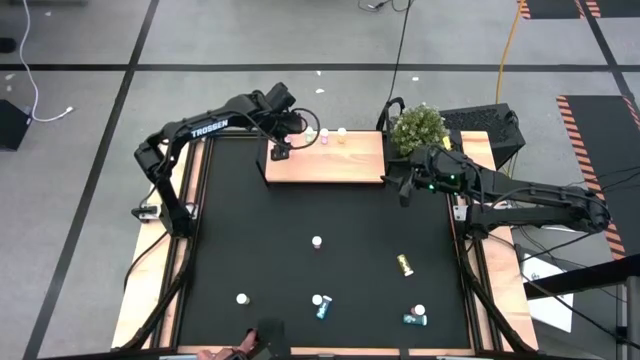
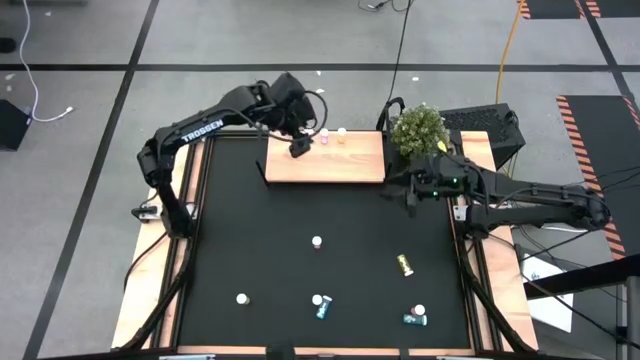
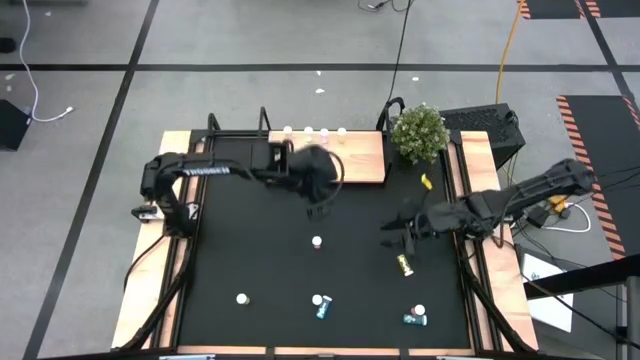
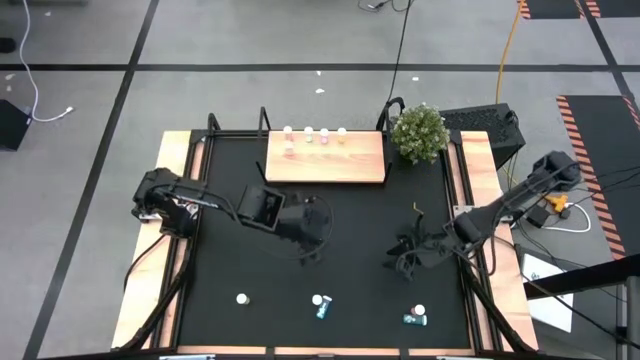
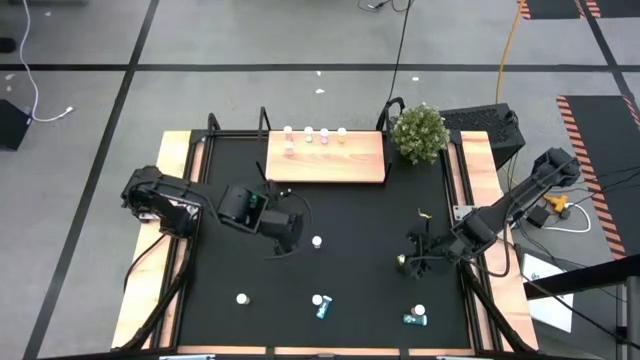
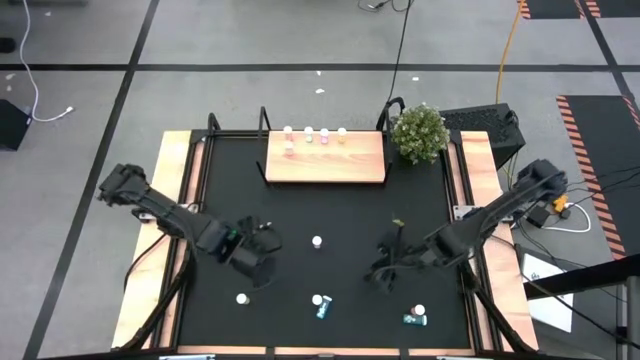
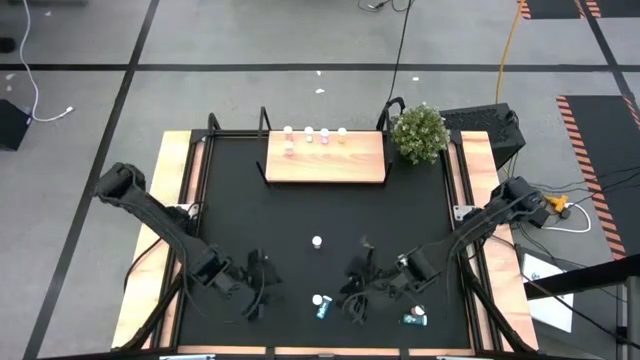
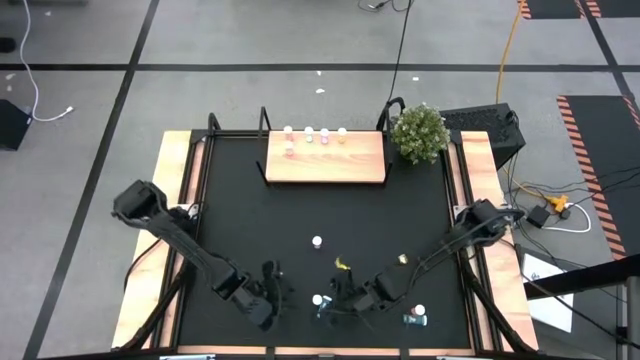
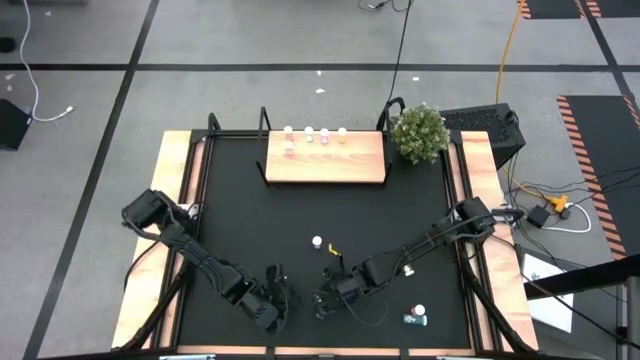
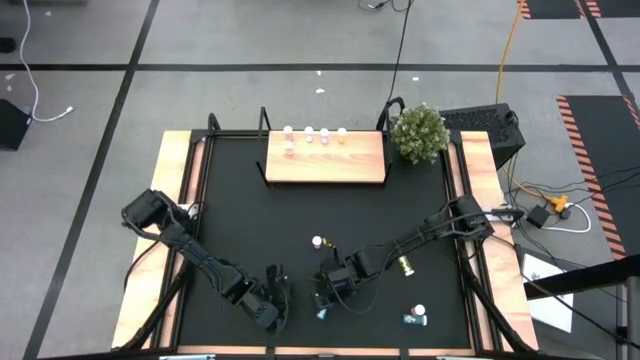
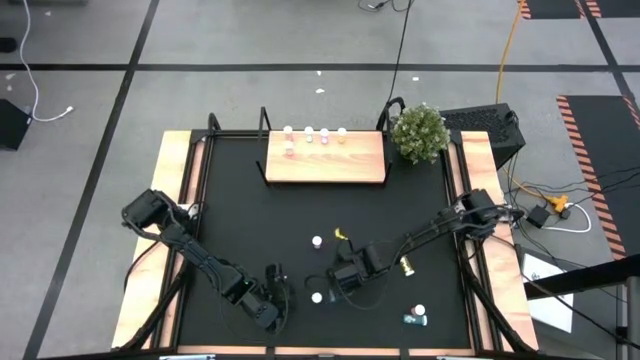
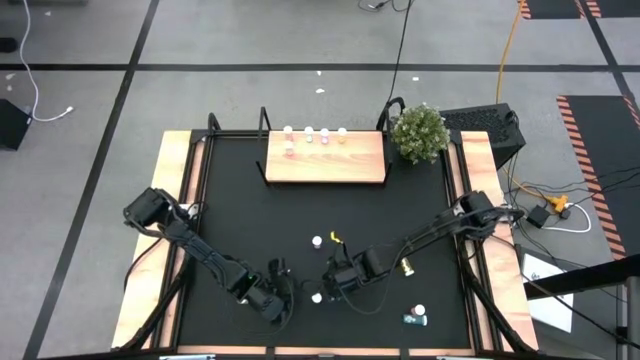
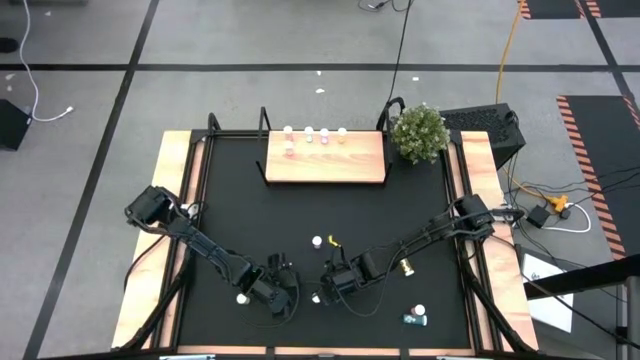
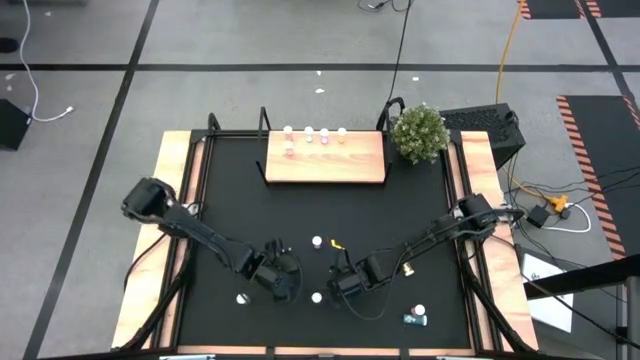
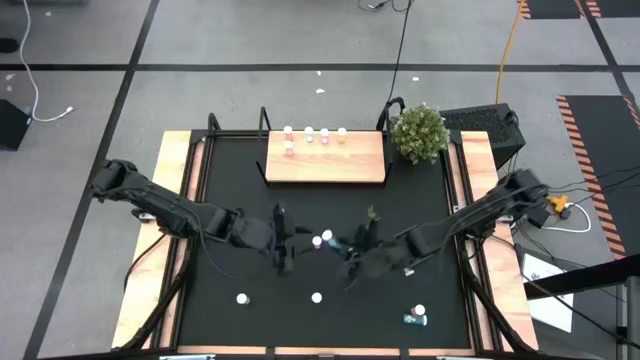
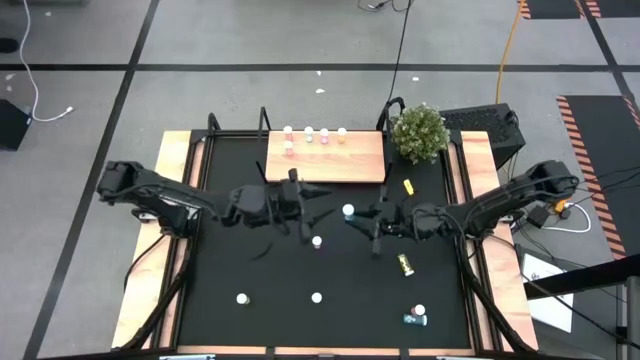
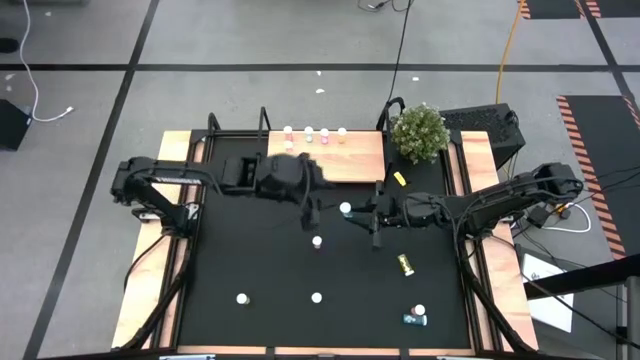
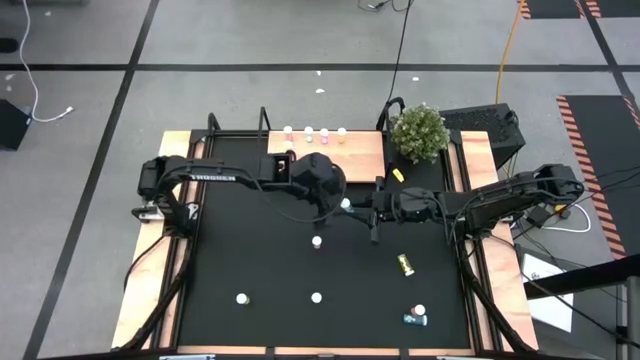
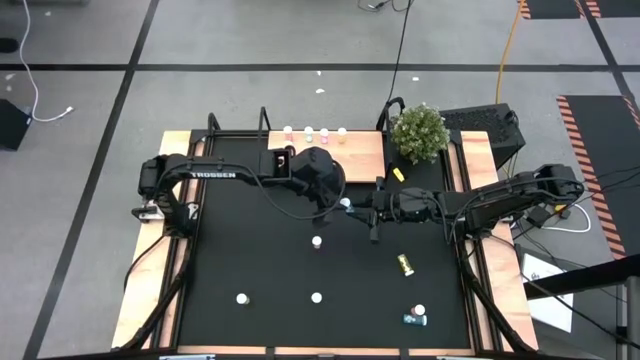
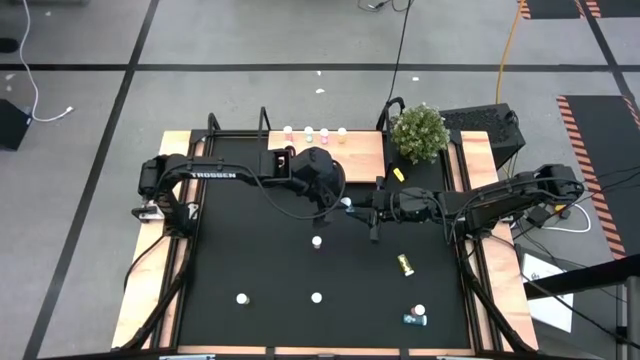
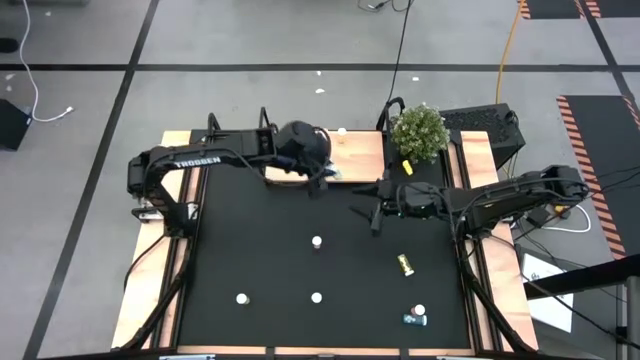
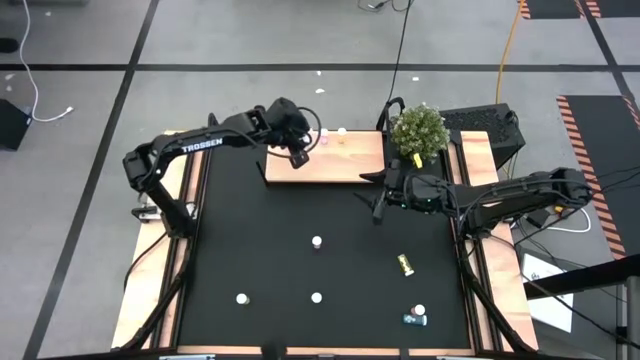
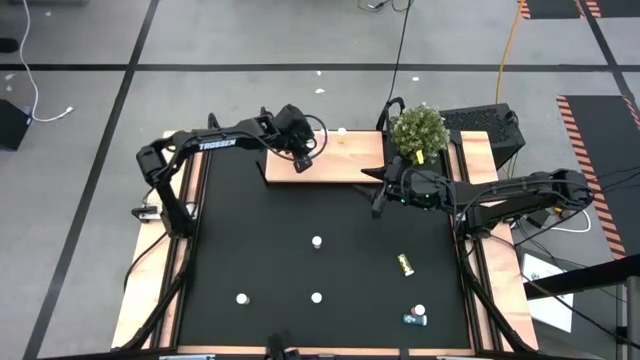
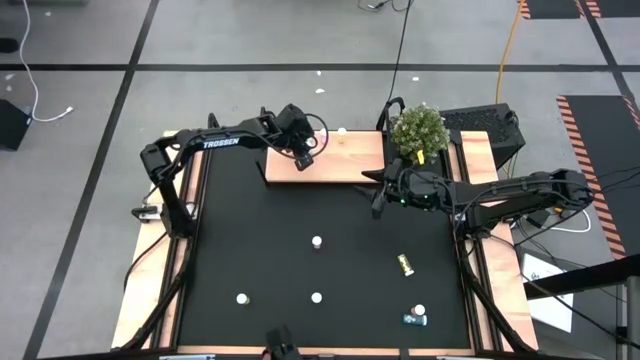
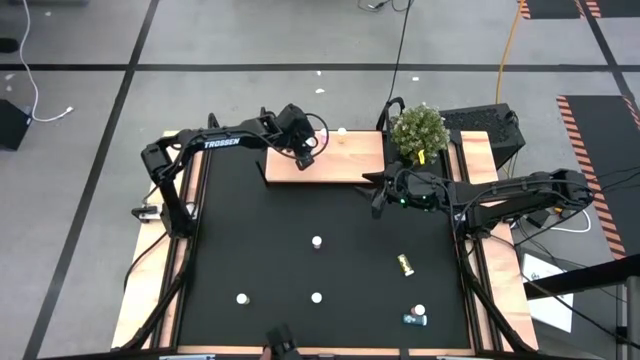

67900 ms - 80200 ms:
Task: Pick and place medicine bottles onto shelf by color
Put the left blue pill bottle on the shelf aligned with the other blue pill bottle

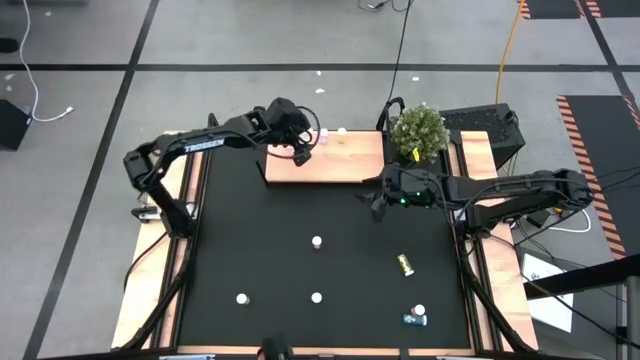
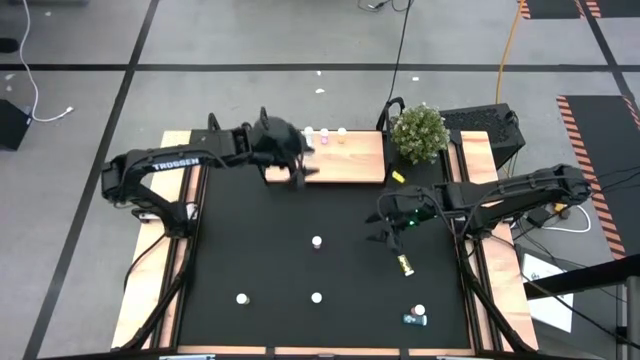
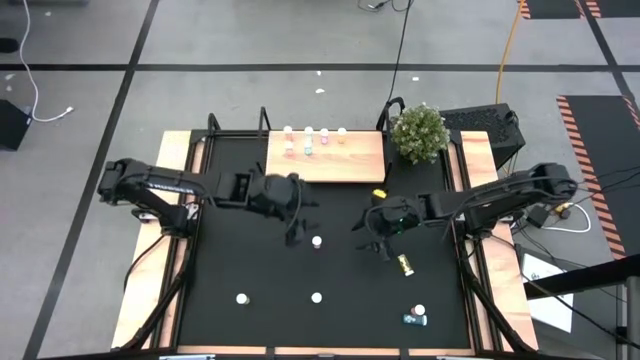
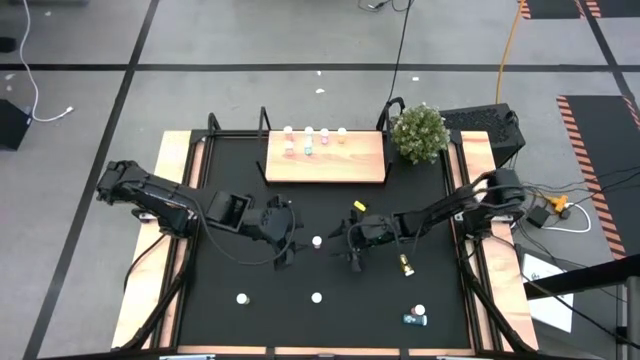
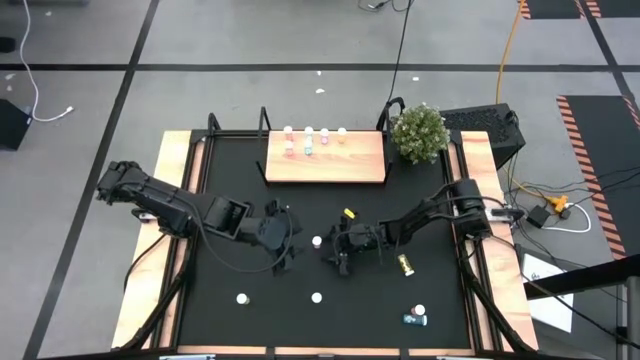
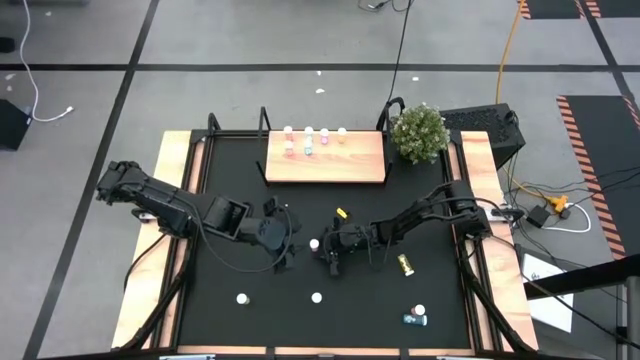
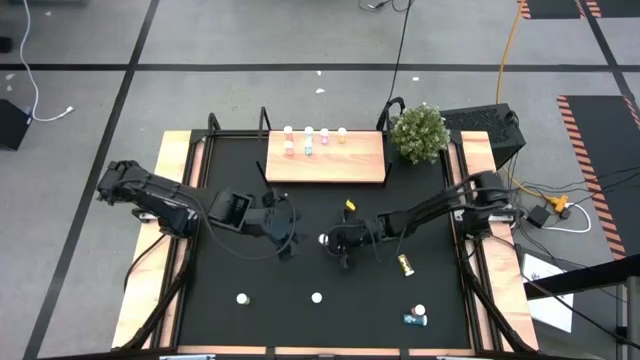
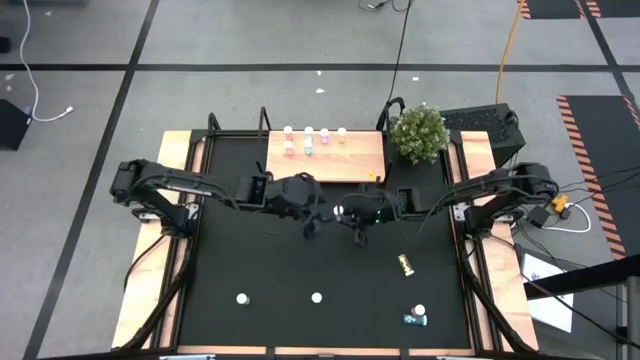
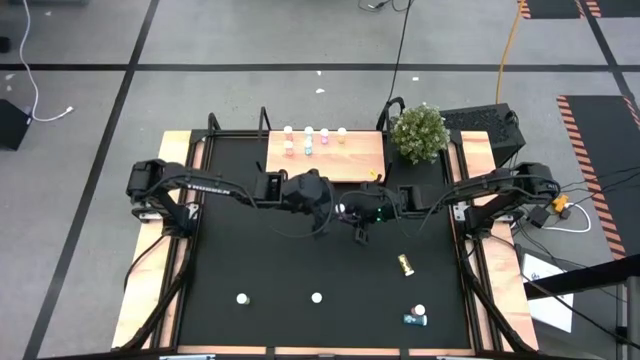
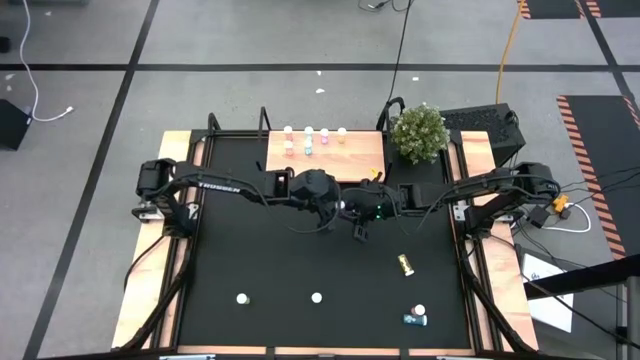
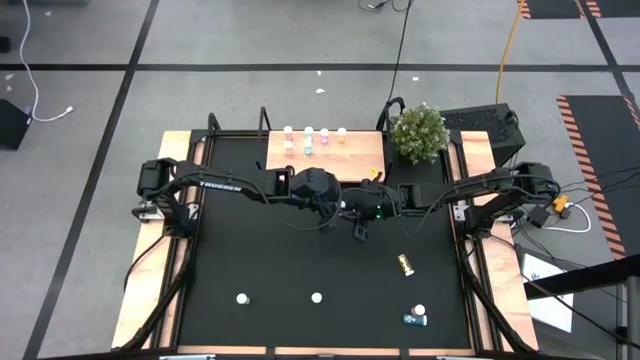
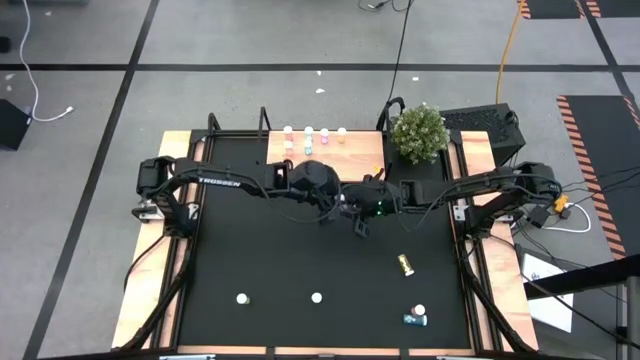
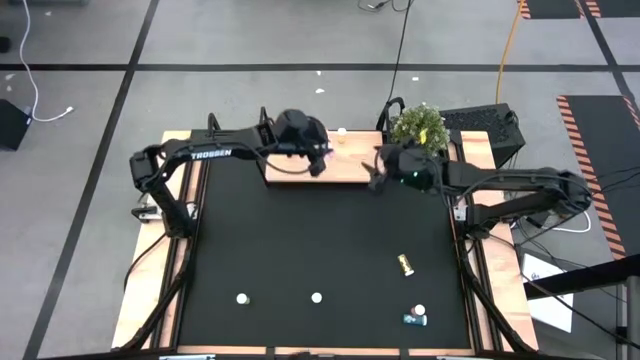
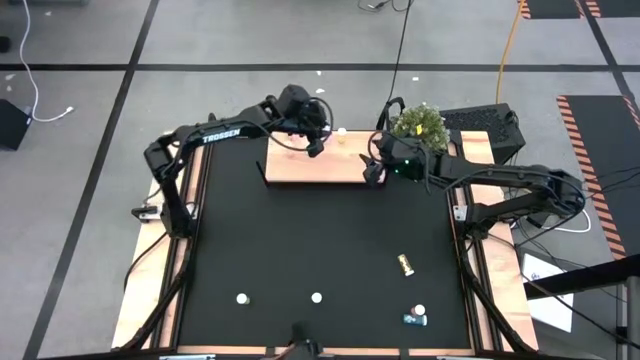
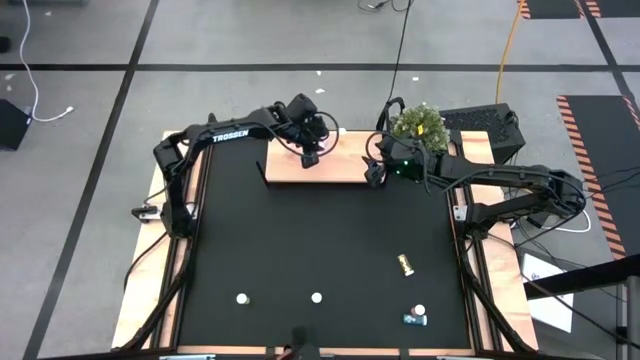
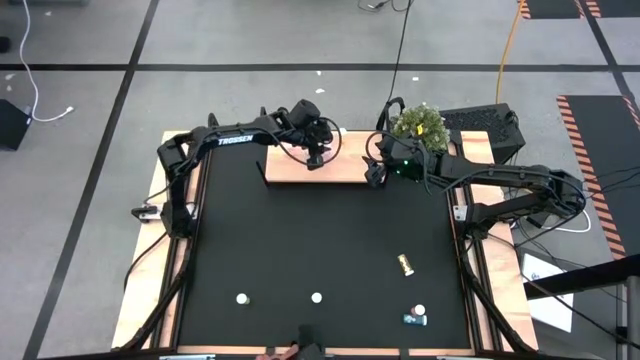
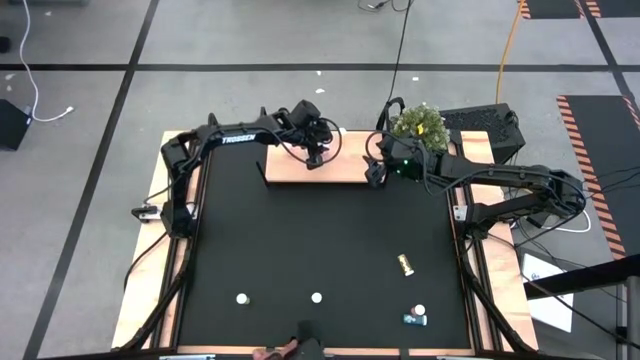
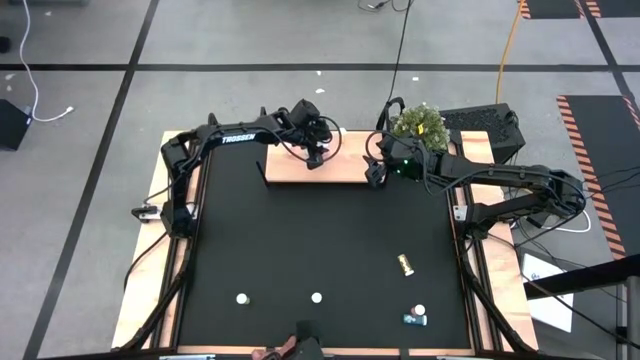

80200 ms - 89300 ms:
Put the top pink pill bottle on the shelf aligned with the other pink pill bottle
